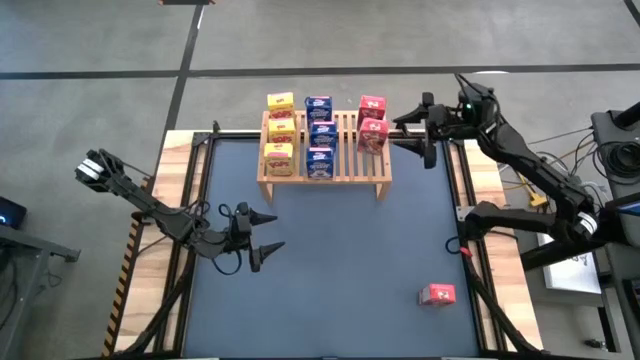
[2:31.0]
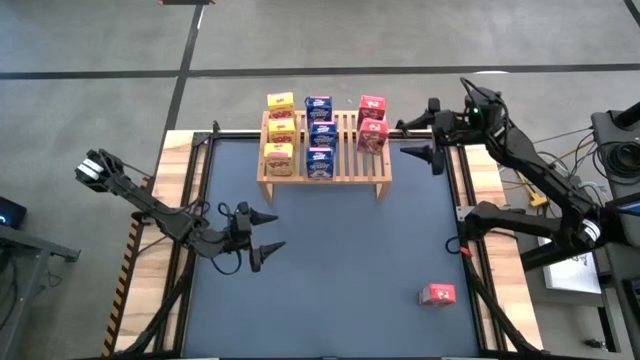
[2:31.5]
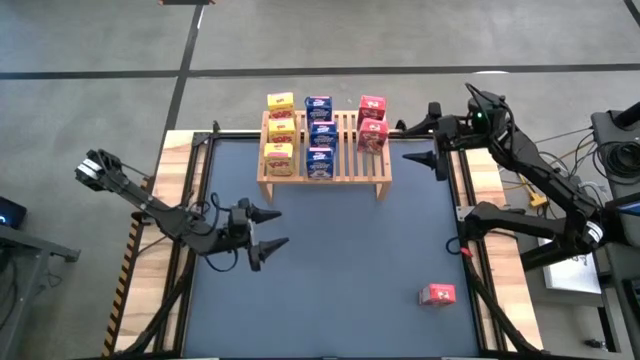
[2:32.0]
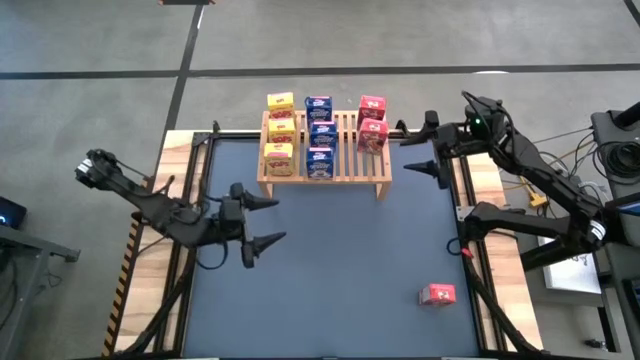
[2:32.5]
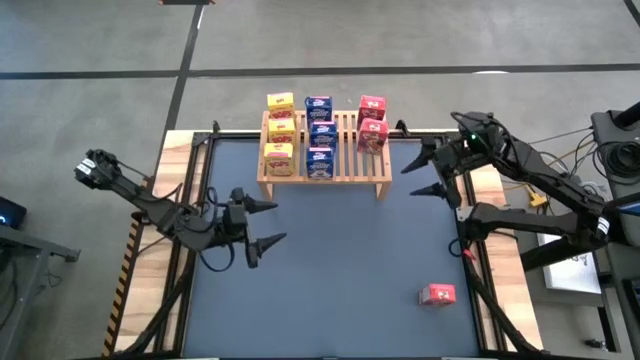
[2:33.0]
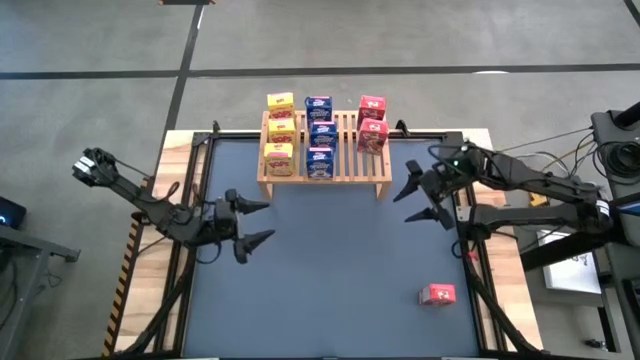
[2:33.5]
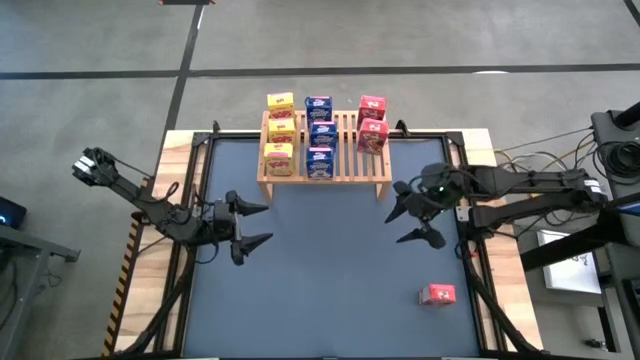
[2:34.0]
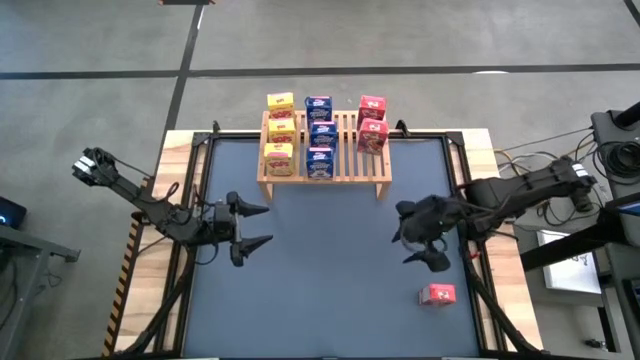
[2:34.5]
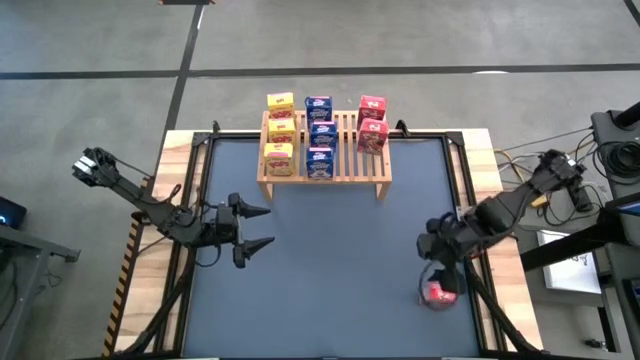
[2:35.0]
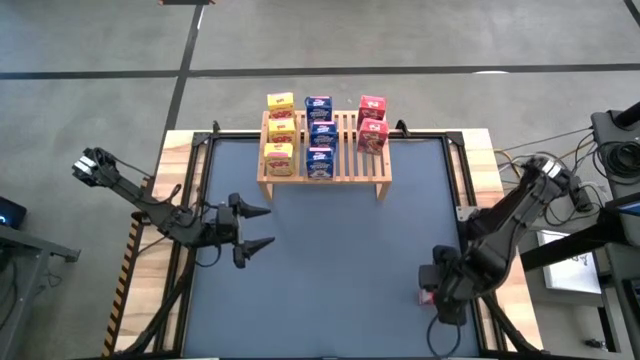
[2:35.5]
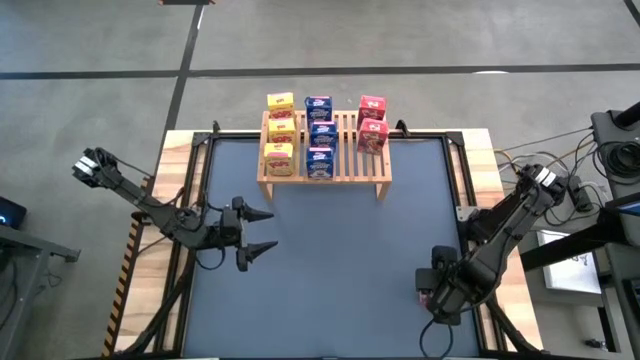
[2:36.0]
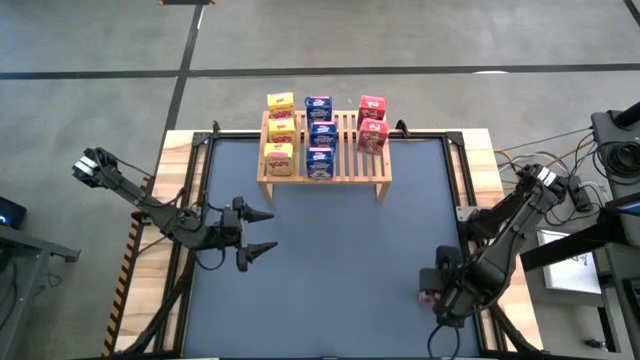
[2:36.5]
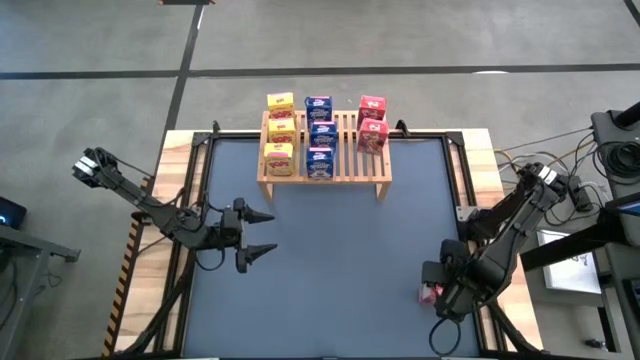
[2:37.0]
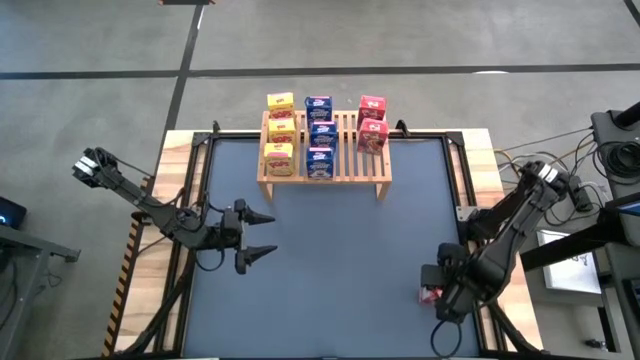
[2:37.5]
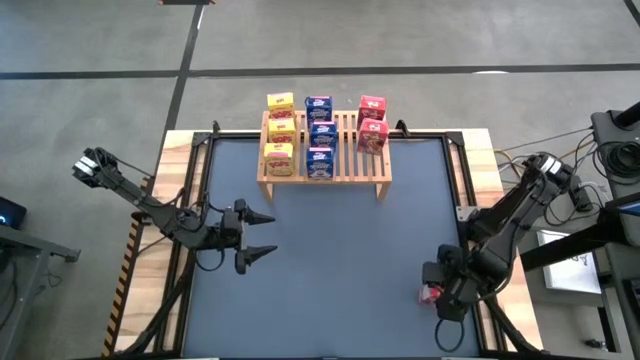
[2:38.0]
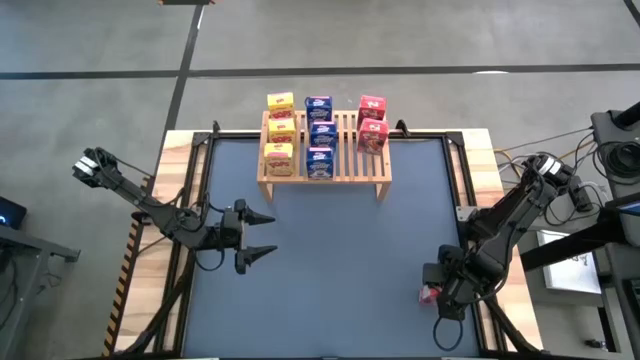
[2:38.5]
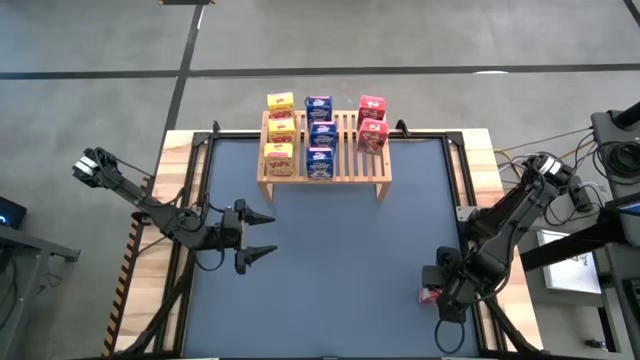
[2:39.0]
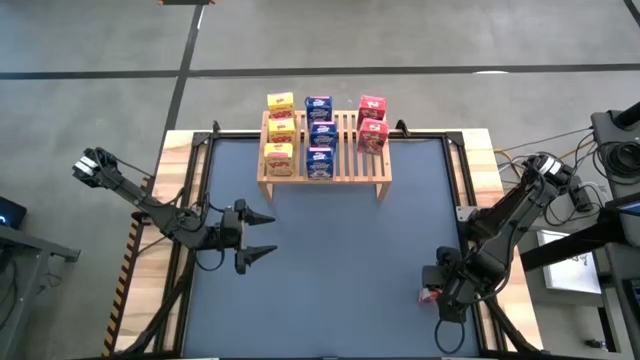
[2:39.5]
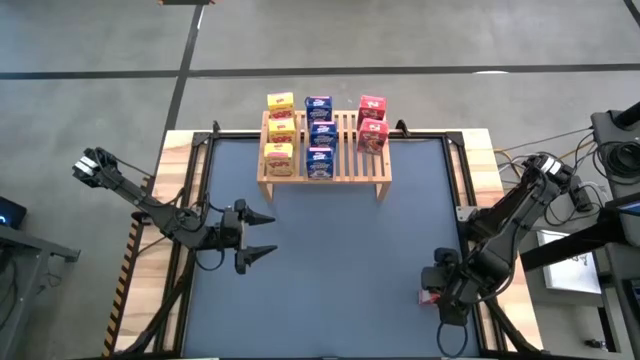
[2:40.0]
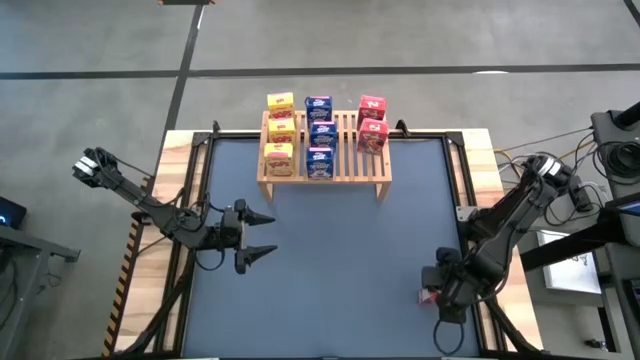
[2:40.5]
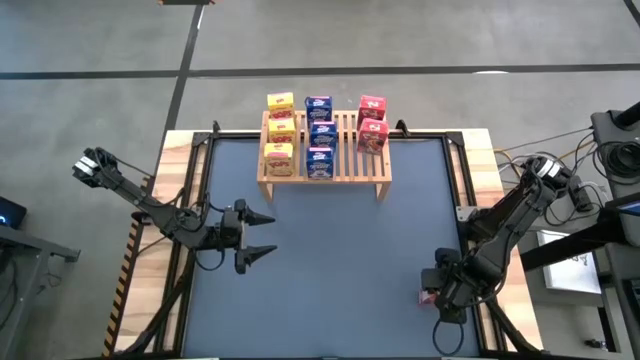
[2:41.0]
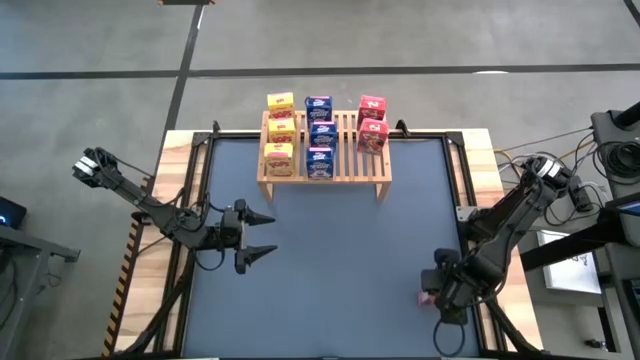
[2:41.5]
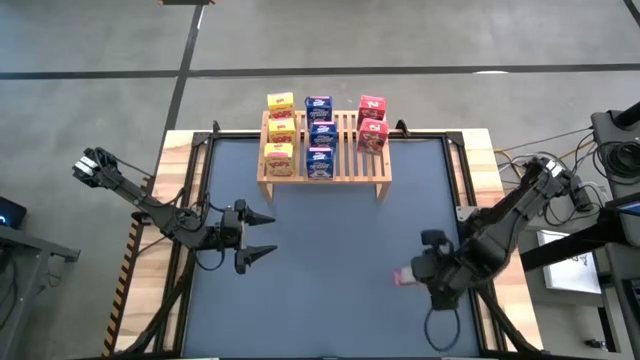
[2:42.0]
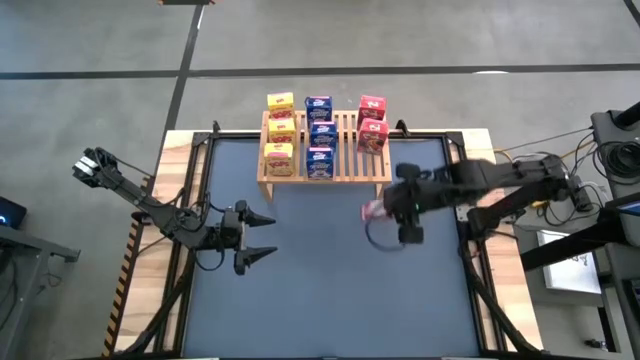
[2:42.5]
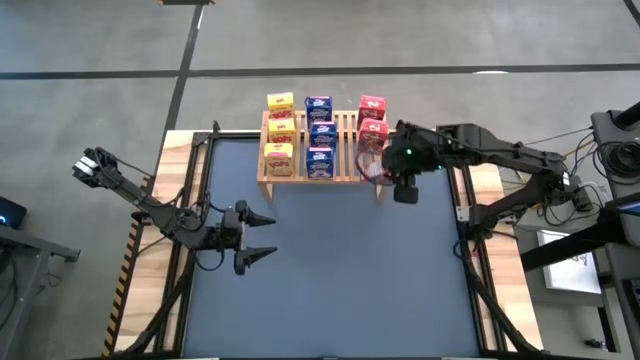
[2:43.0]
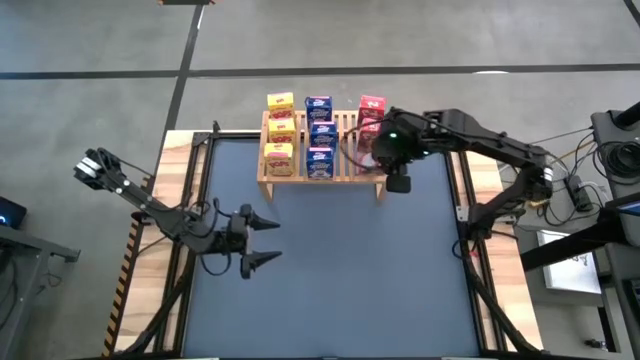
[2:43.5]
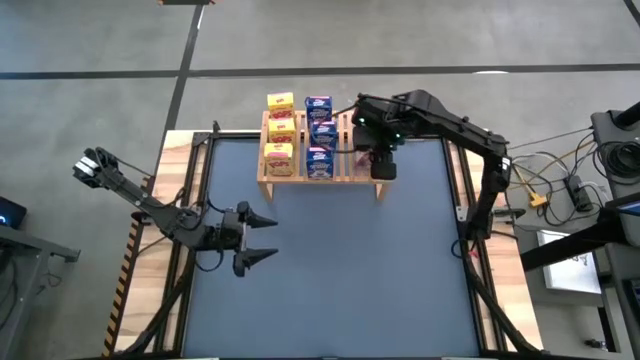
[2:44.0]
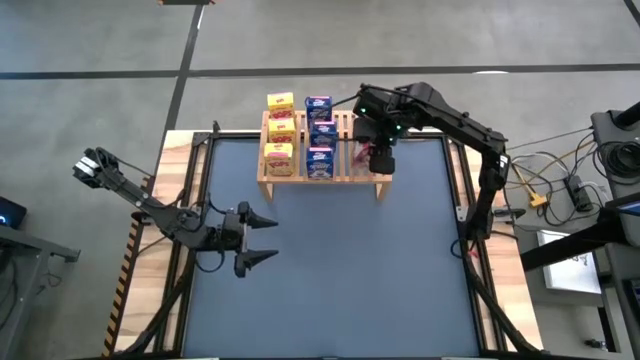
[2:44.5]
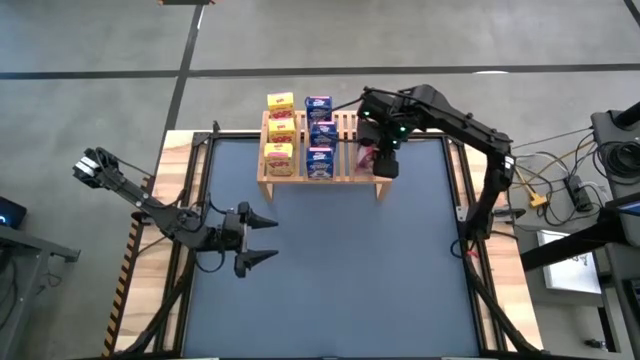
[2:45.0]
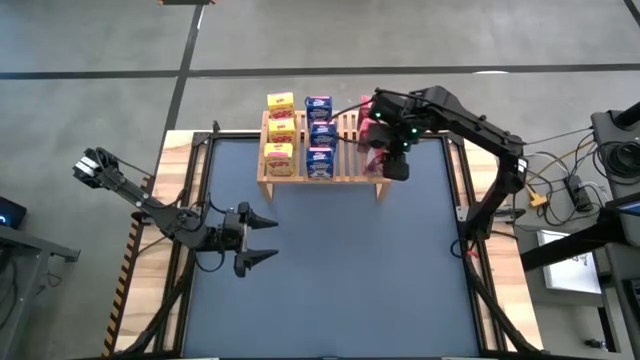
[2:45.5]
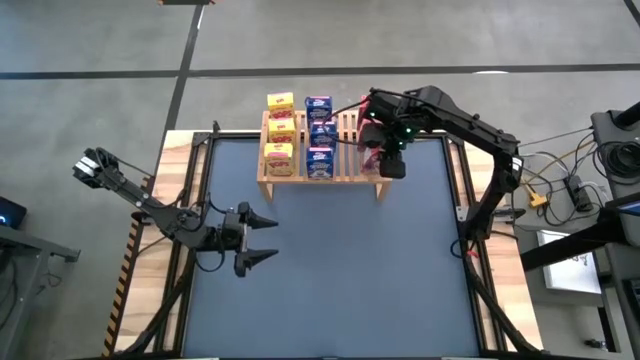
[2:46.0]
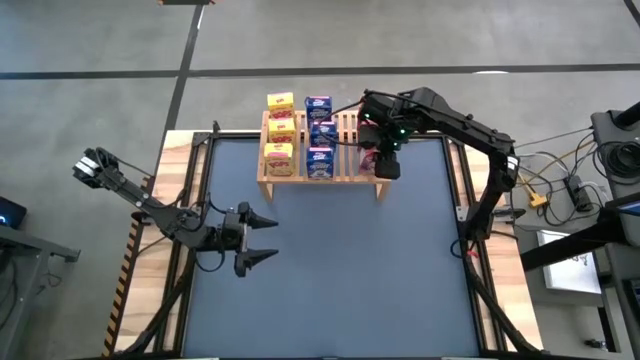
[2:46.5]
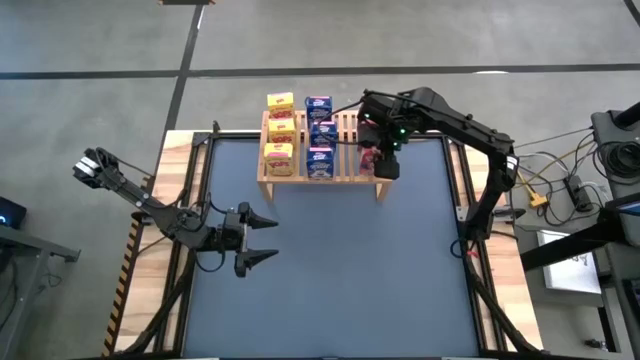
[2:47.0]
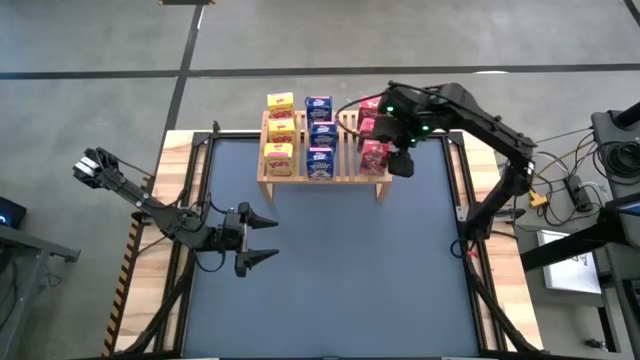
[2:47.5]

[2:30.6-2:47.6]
Task: Stack cereal on shelf
Put the red cereal box on the shelf aligned with the other red cereal box

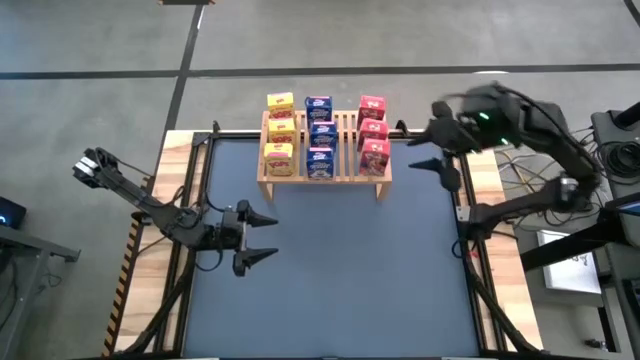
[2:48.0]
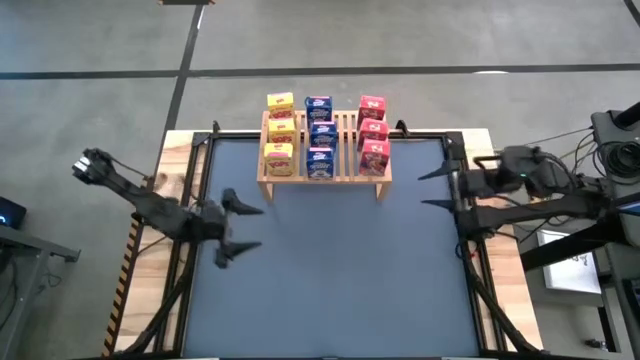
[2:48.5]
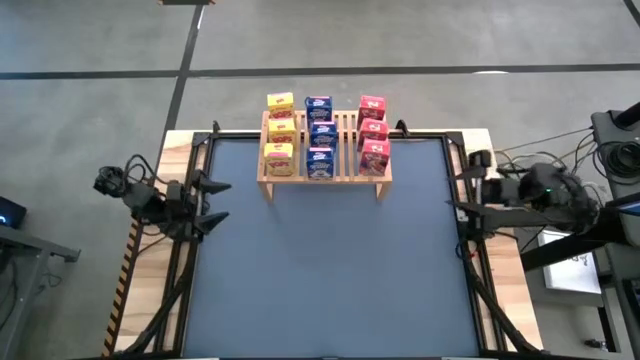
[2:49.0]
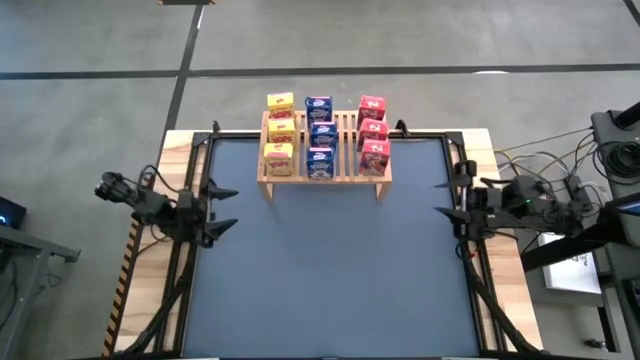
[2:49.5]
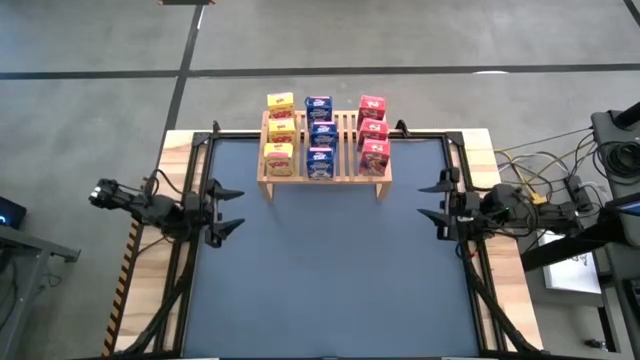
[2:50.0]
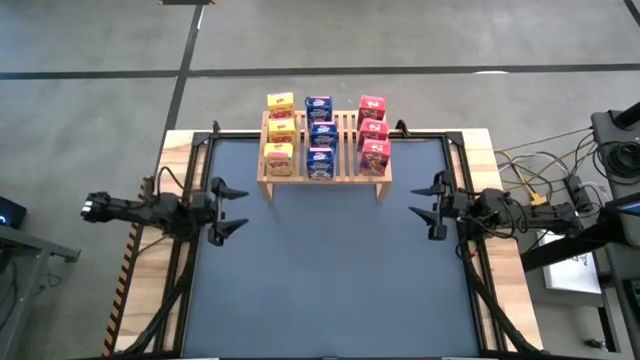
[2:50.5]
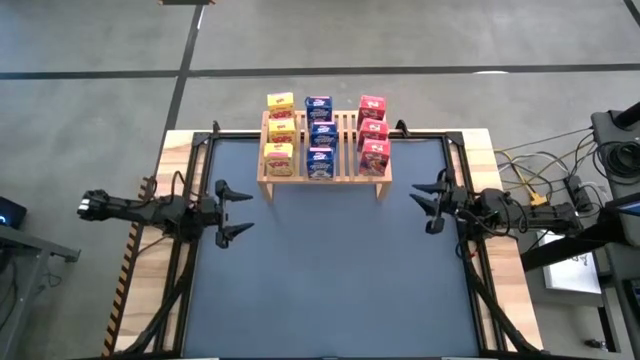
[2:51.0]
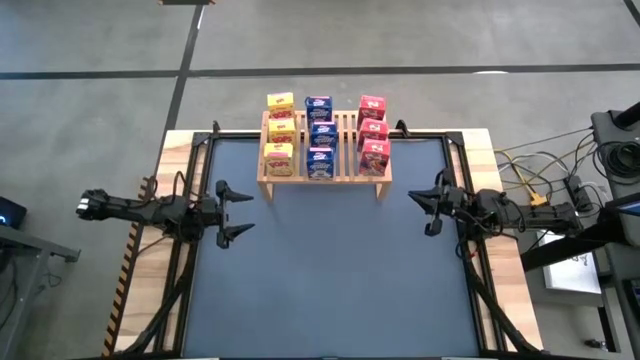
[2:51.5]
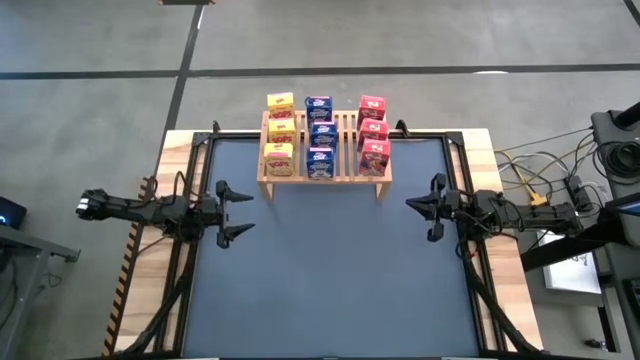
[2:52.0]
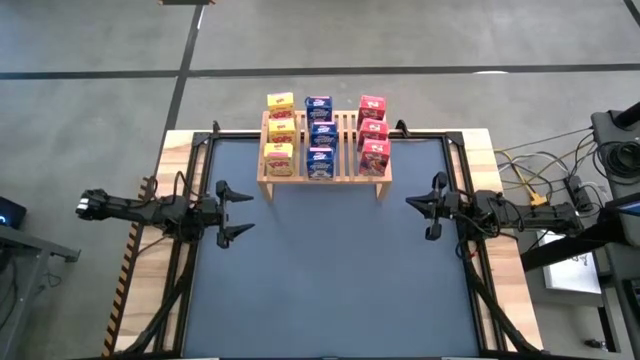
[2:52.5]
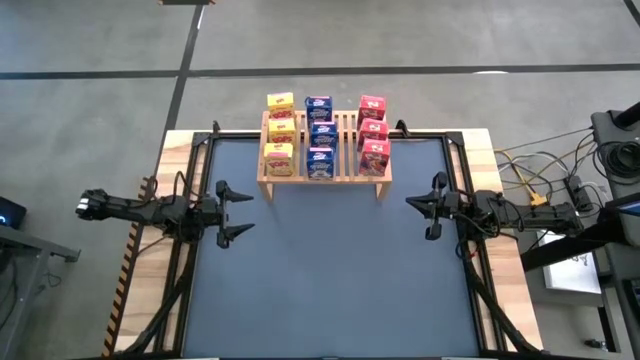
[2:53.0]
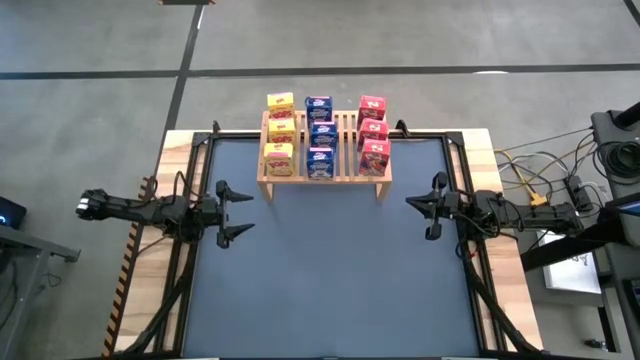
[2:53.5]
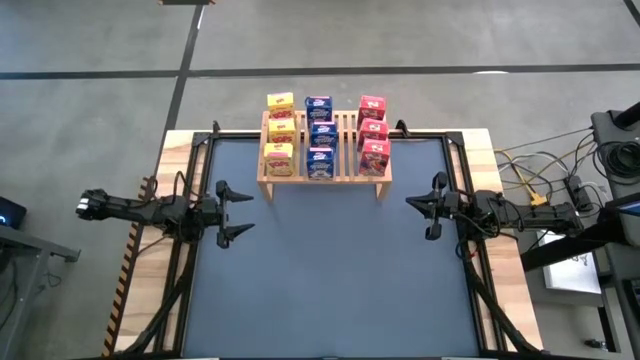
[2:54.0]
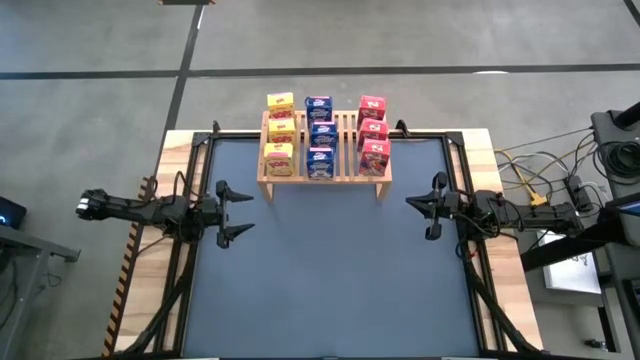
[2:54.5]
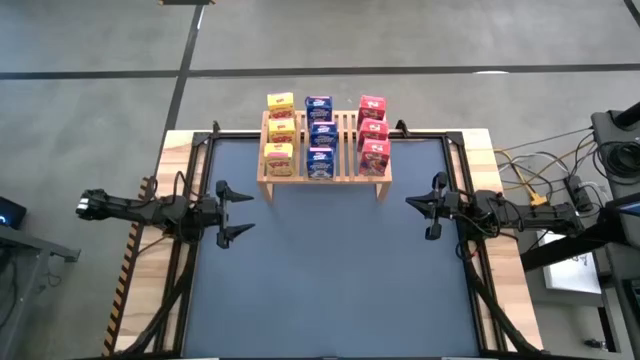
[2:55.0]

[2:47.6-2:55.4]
Return to Home Position
